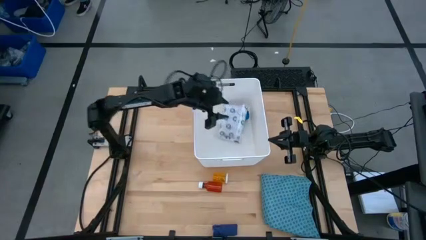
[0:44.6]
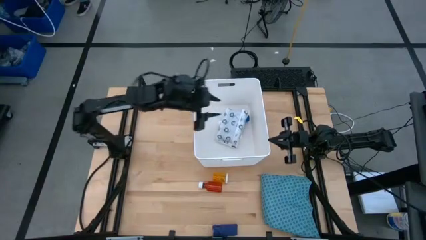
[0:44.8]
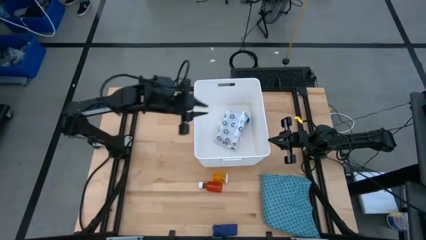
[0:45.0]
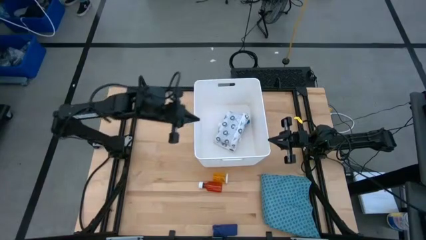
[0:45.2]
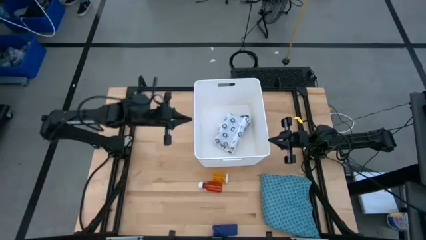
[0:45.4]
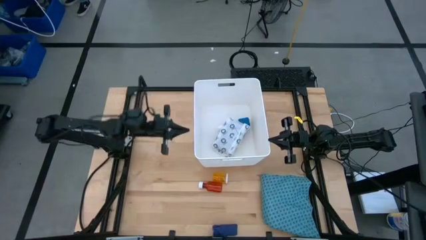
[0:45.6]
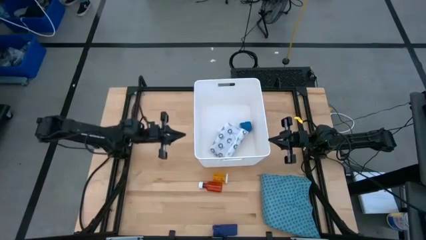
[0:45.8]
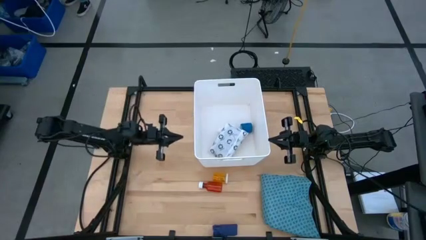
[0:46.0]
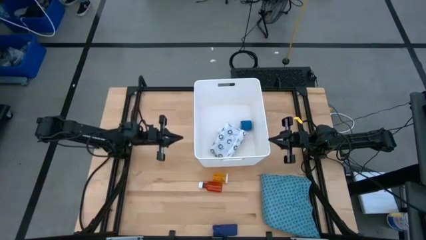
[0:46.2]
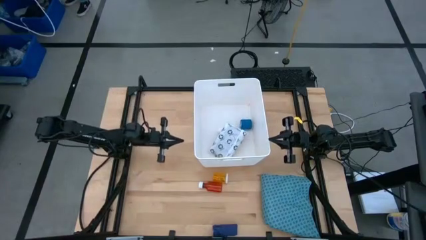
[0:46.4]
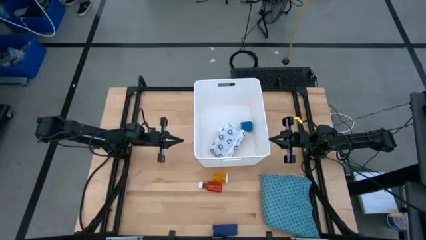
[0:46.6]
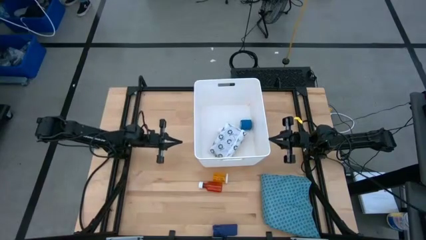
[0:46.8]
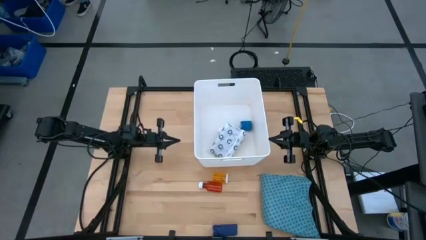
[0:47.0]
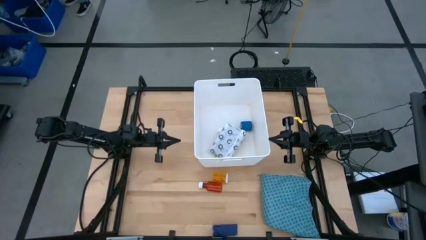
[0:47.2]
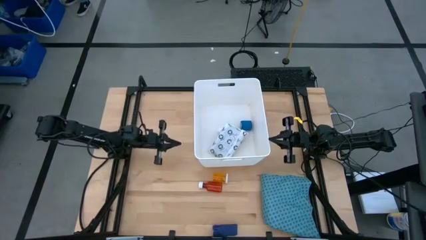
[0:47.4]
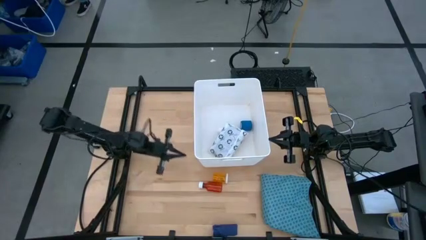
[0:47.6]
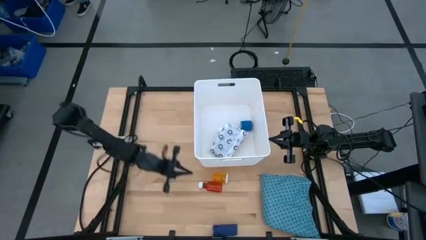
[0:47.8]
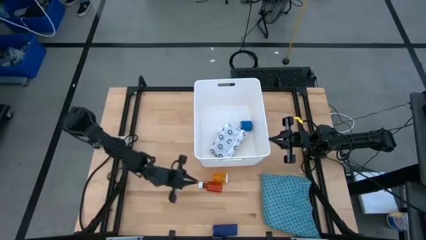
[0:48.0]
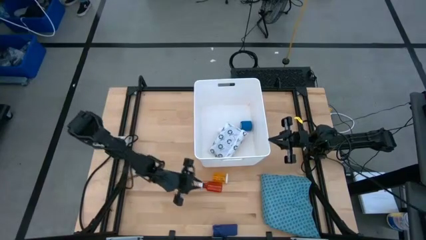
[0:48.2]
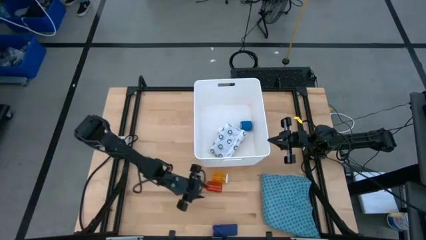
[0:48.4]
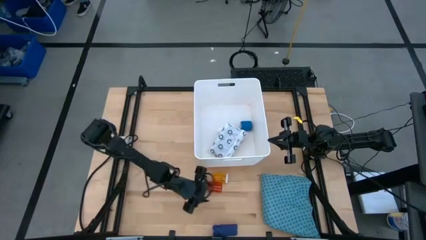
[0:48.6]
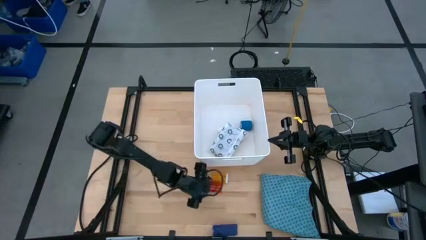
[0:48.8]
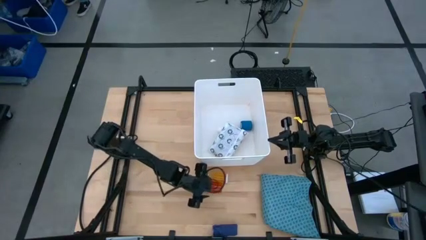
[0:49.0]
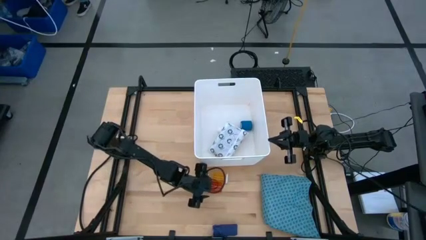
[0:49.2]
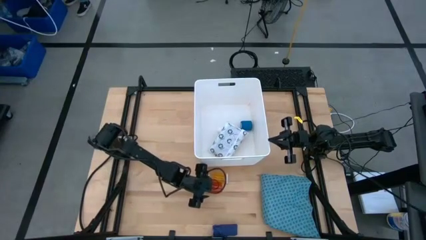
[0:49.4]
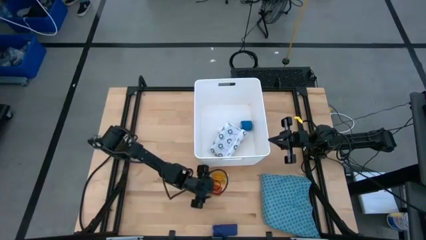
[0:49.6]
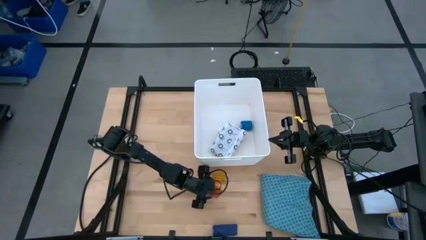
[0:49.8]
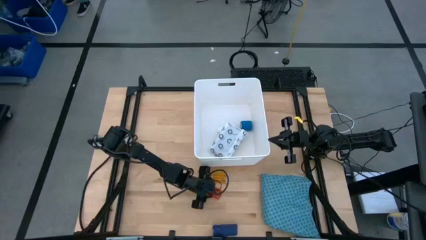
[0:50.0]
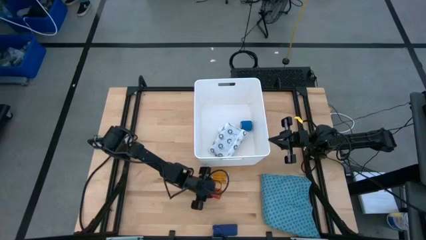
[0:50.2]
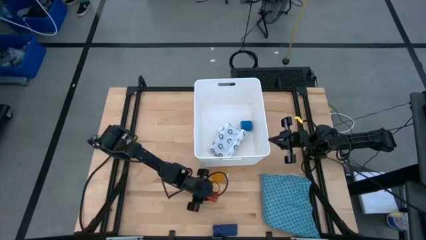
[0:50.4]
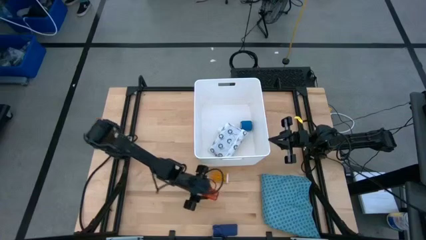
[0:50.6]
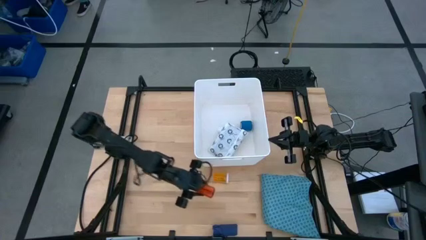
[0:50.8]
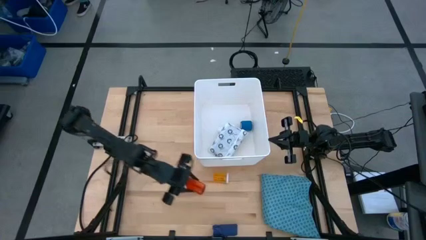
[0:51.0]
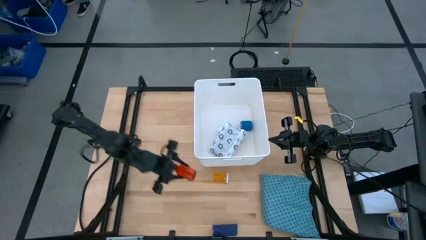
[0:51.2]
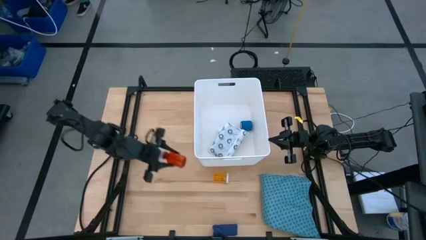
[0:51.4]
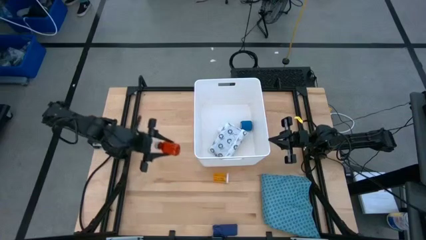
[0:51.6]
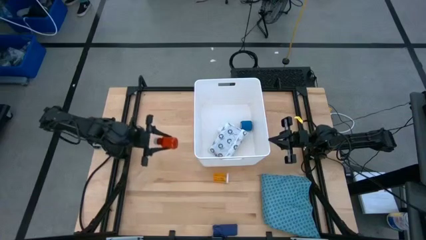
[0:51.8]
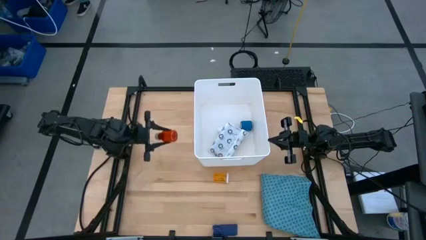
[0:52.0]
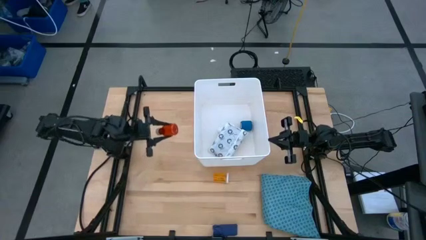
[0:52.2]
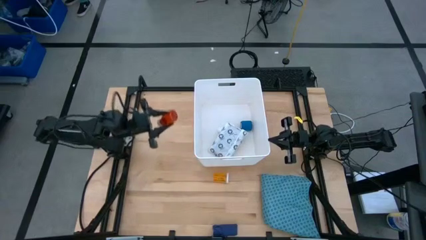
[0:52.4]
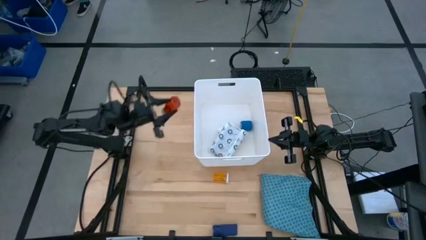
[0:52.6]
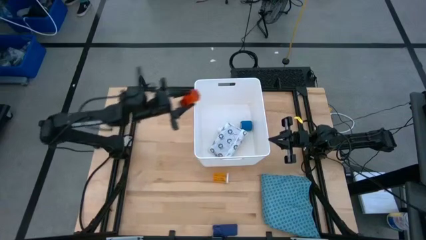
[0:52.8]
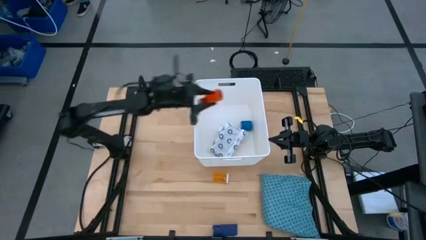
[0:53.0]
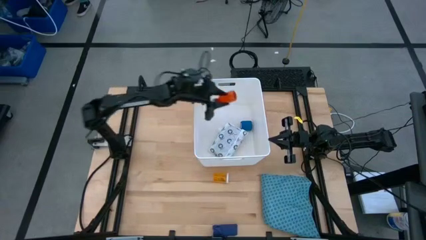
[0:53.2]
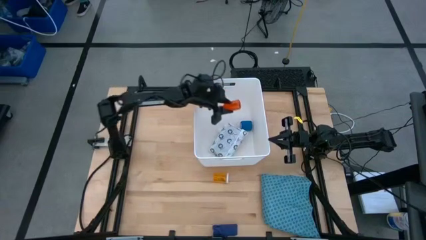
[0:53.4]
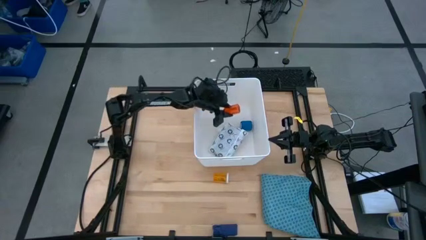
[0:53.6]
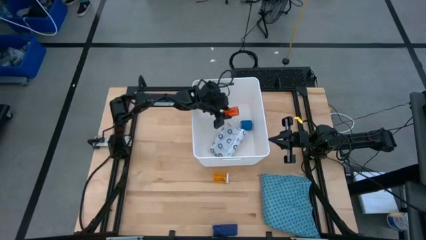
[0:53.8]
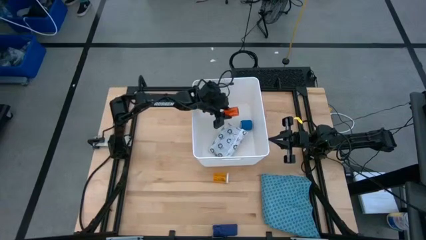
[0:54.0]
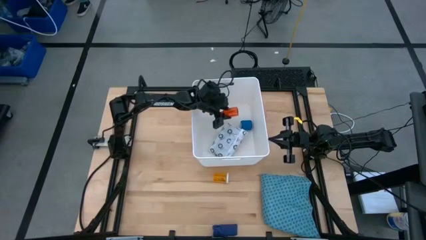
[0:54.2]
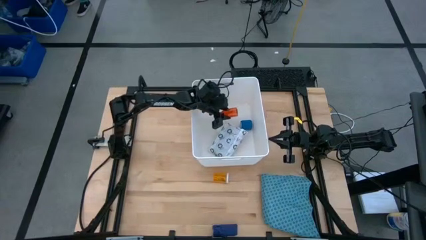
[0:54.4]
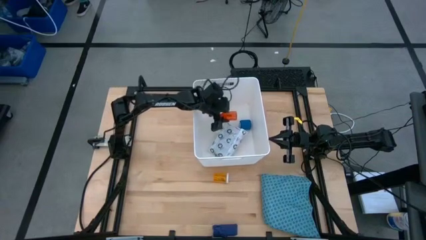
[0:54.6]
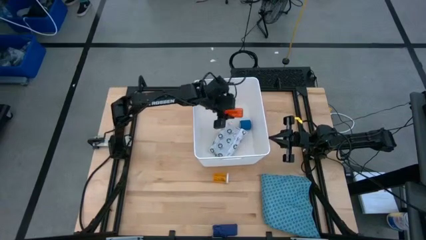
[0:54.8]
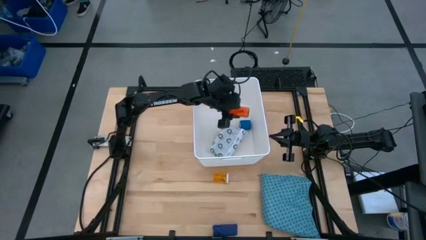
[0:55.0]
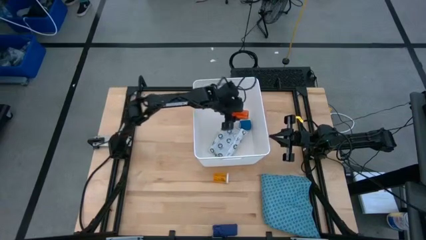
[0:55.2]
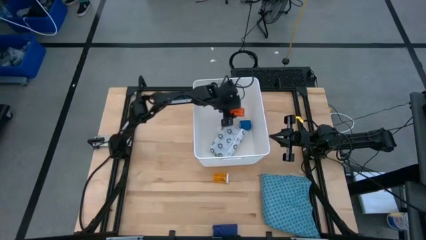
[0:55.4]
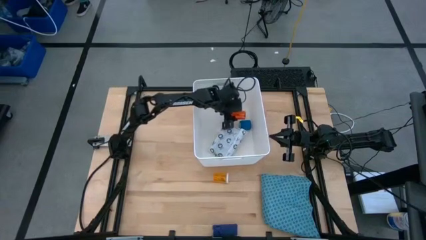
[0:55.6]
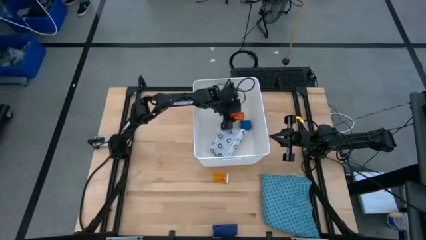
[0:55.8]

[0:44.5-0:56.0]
Task: Pick & place medical supplies in basket/bin
Put the red pill bottle into the white container
